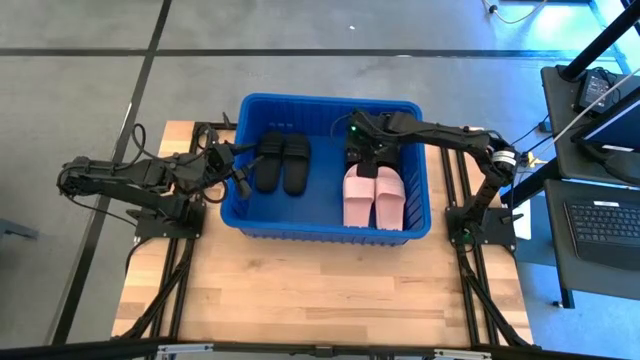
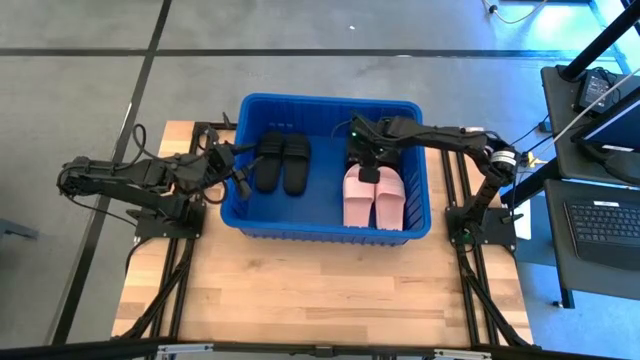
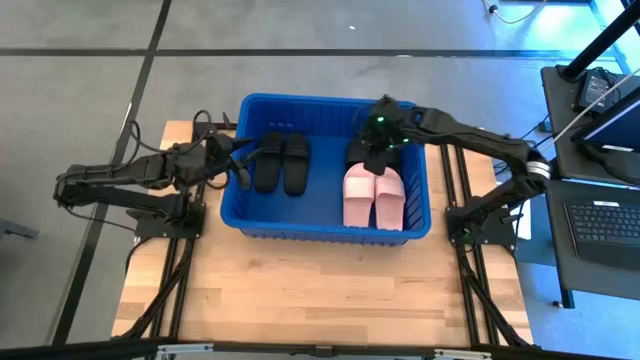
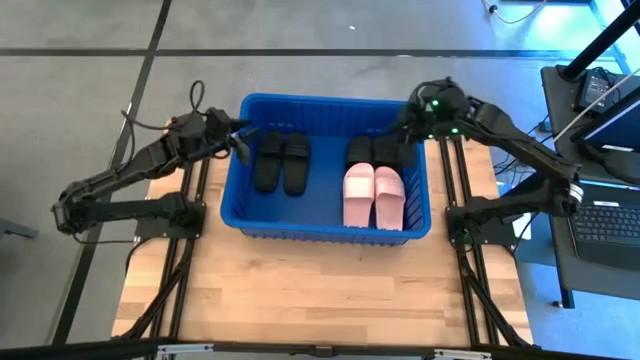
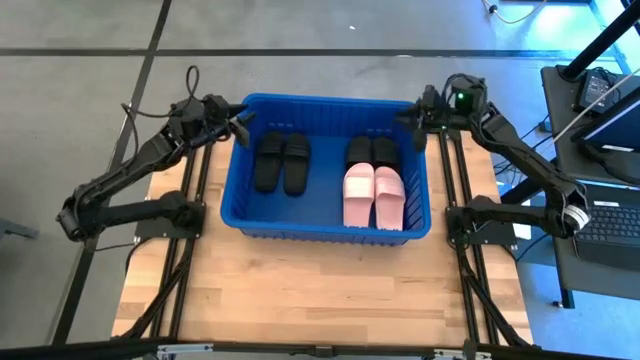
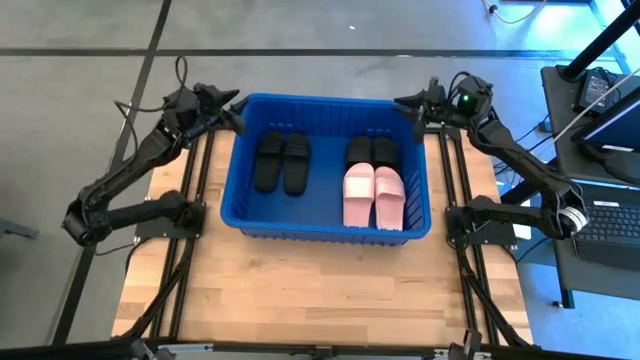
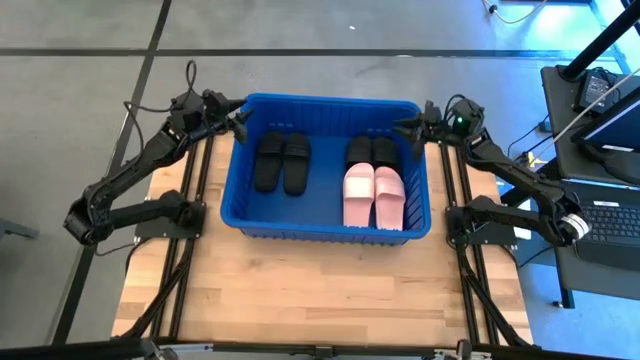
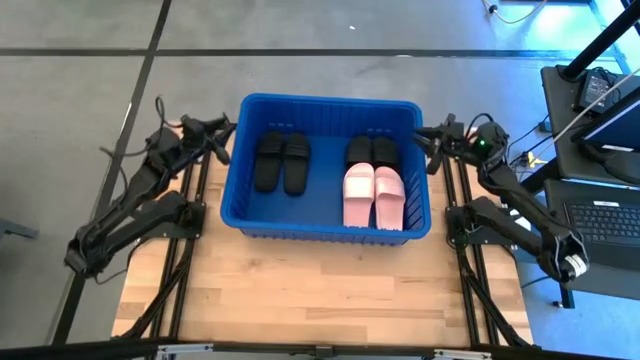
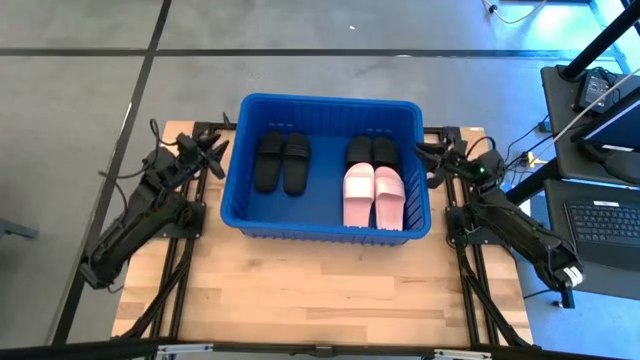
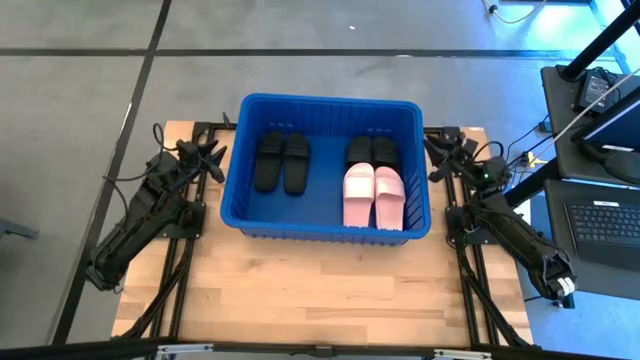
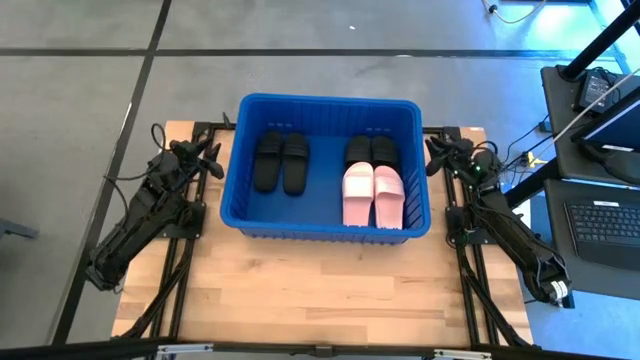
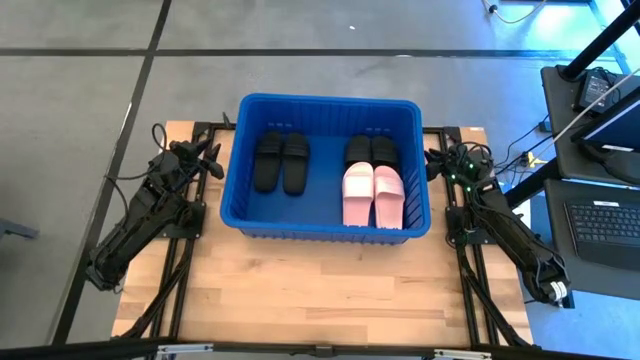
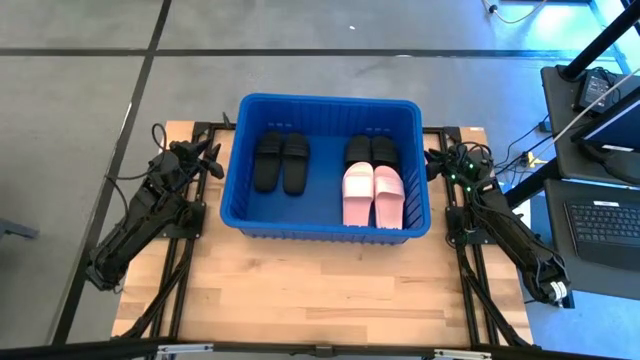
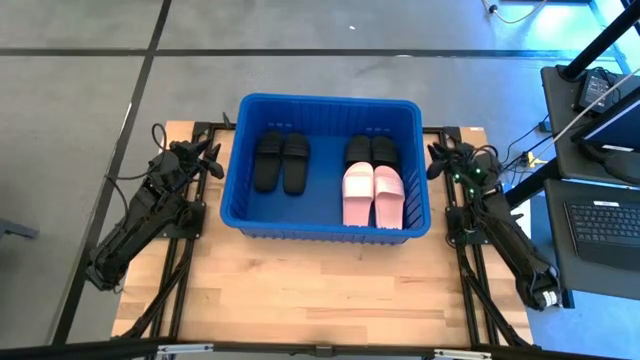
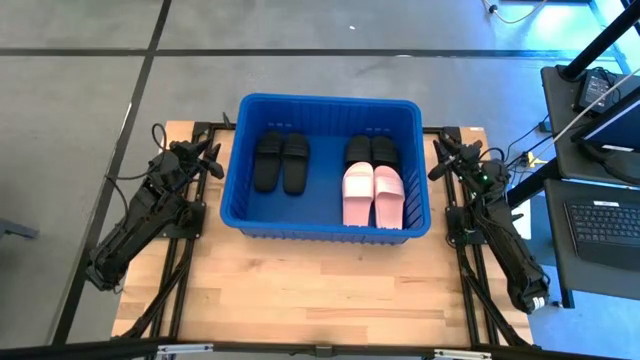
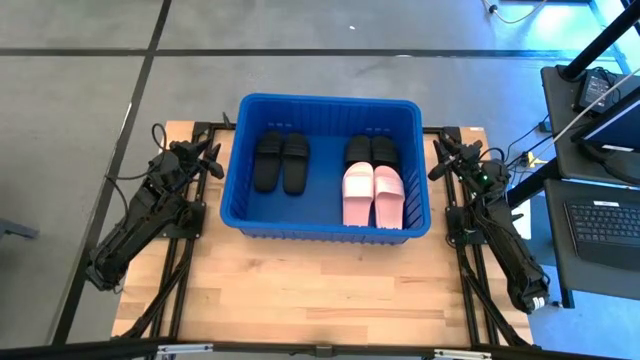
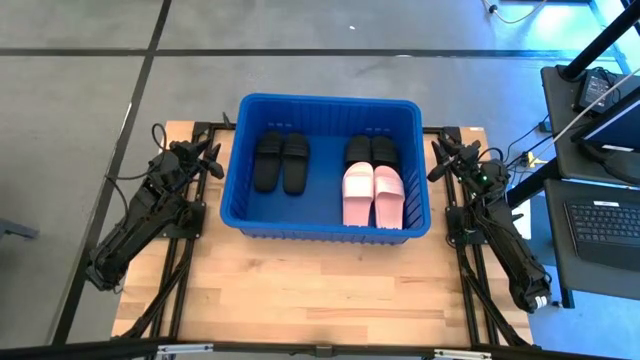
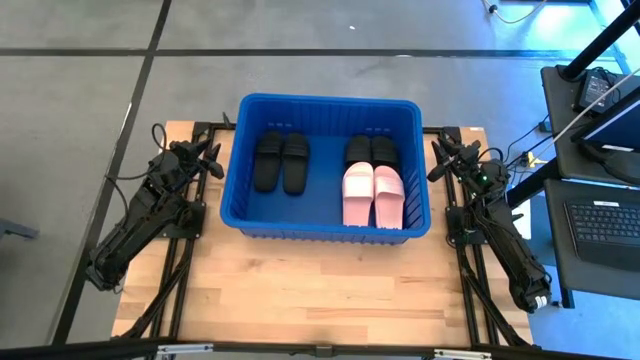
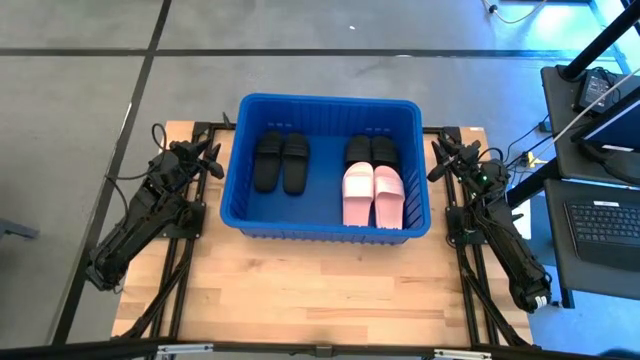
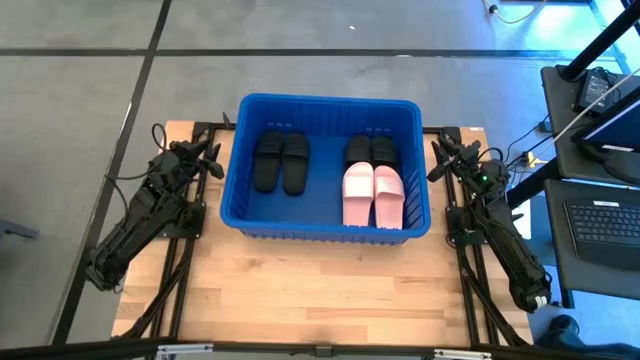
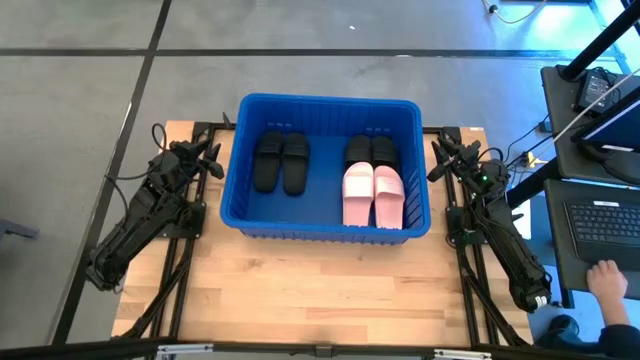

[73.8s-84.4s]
Task: Pick and place slides into bin
Return to Home Position

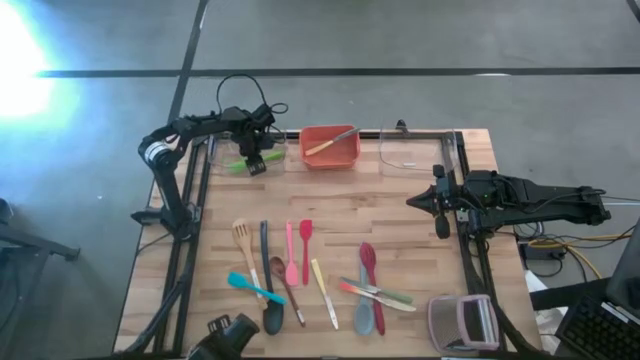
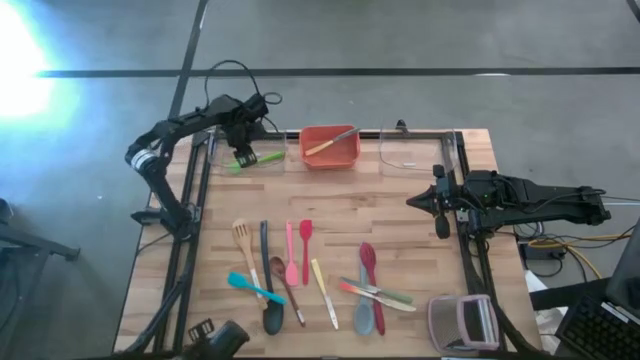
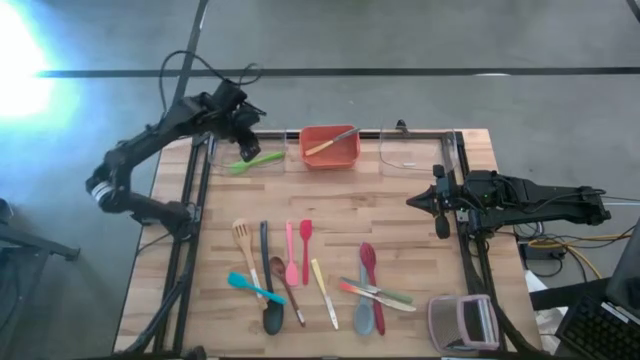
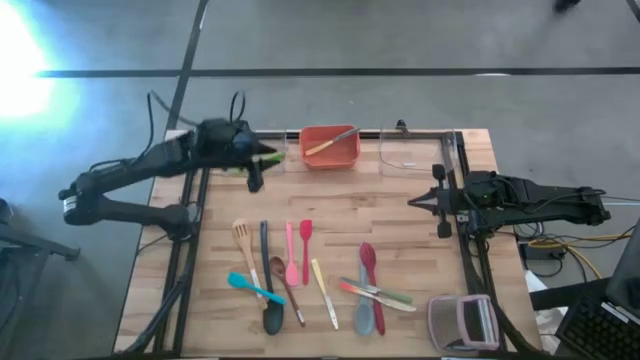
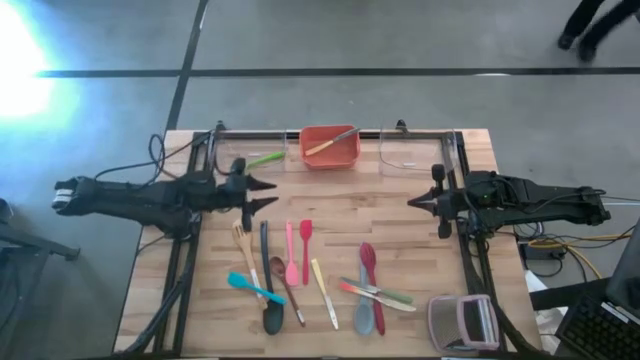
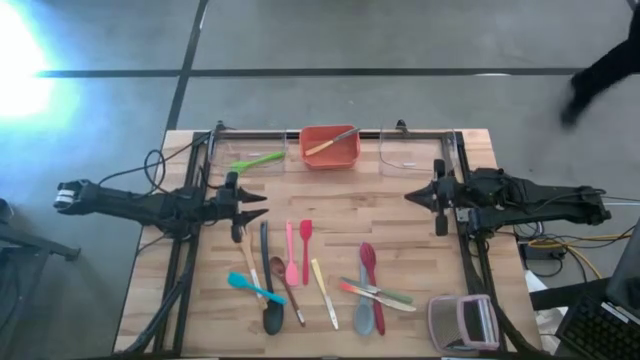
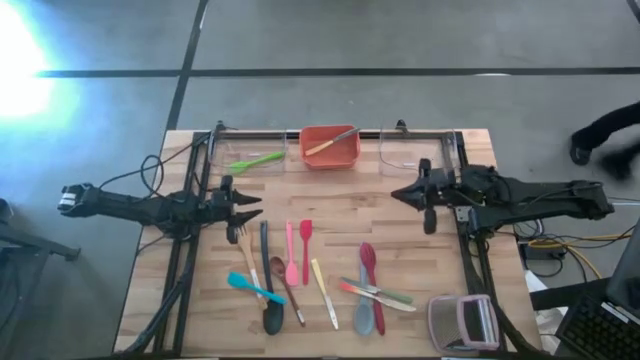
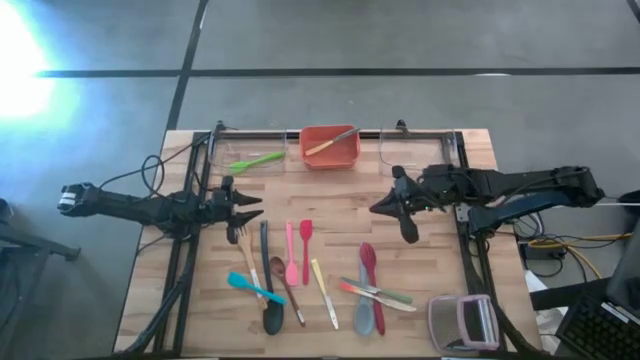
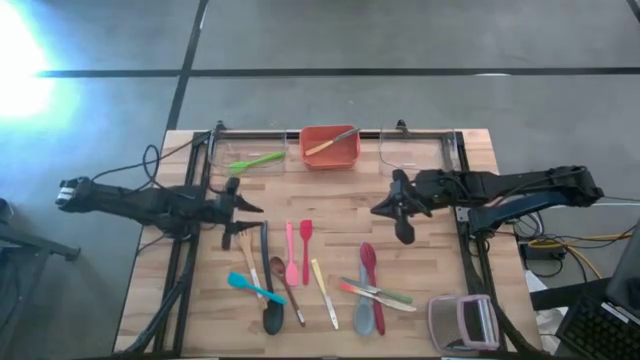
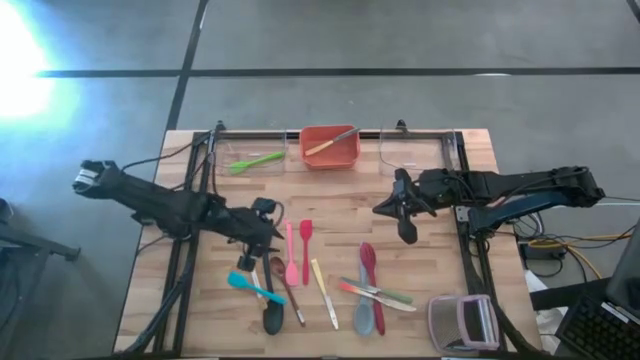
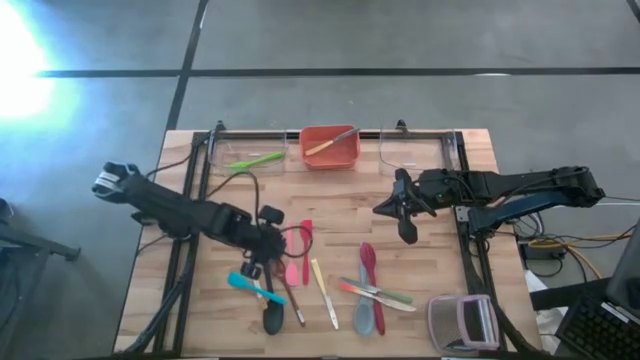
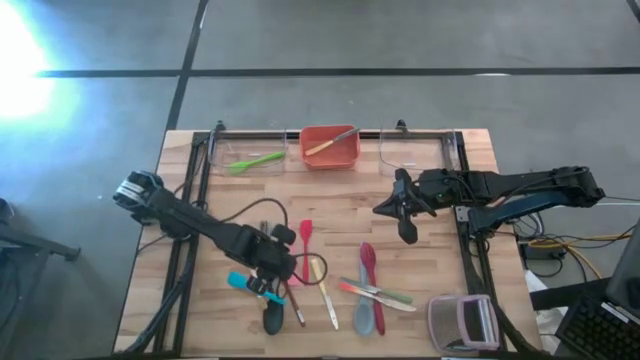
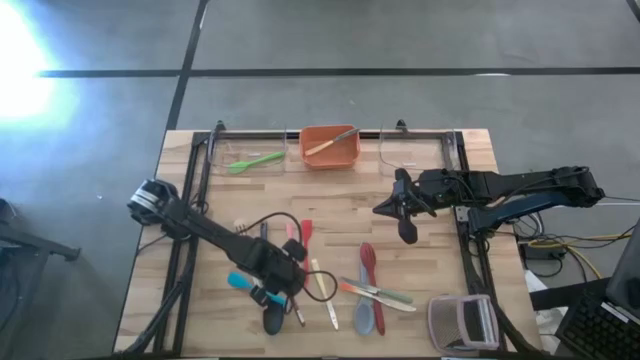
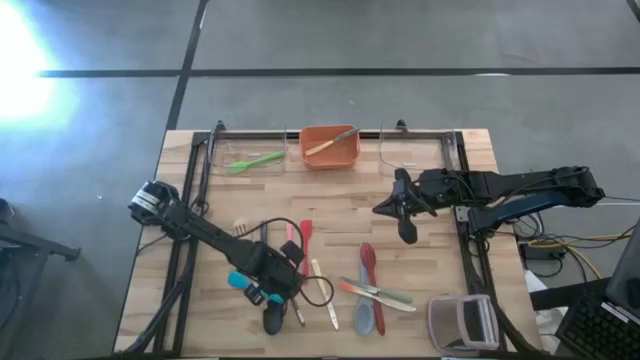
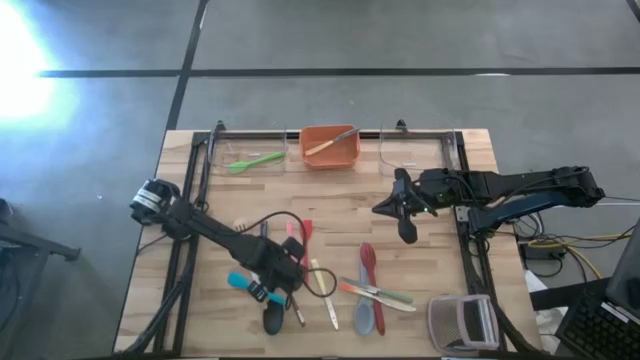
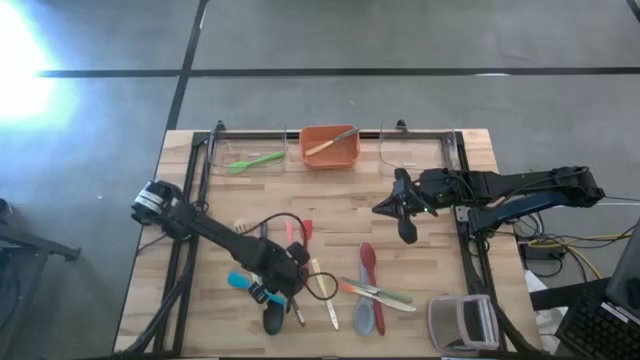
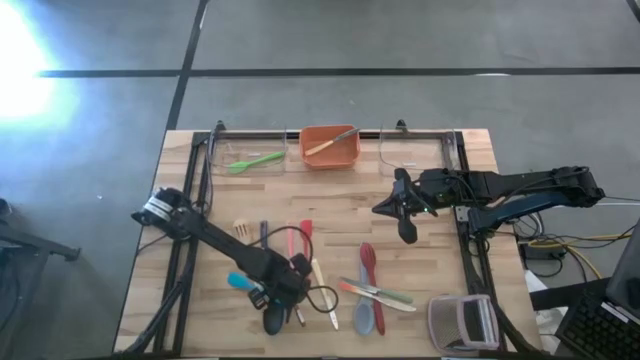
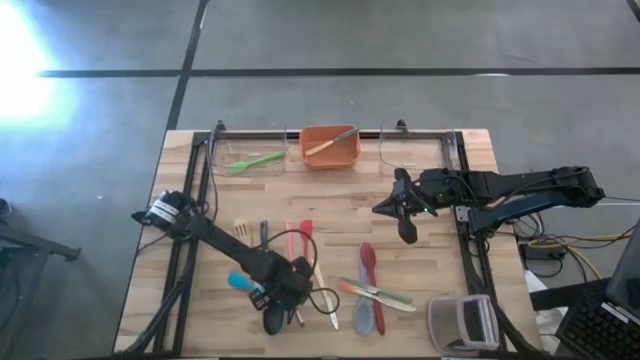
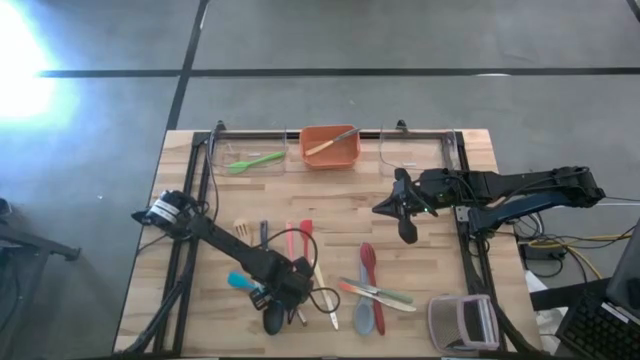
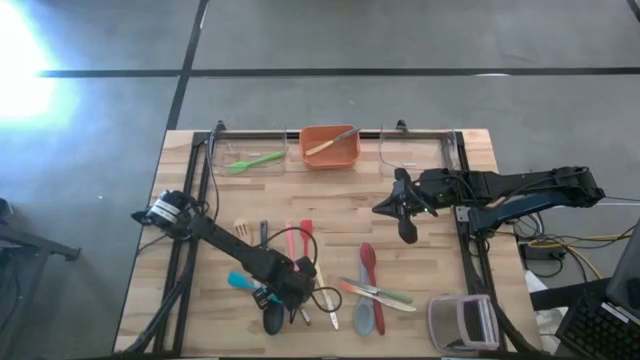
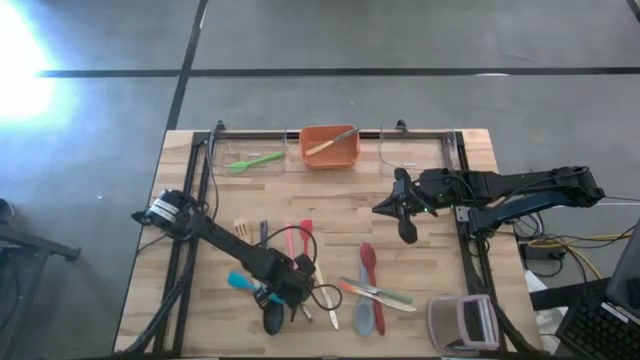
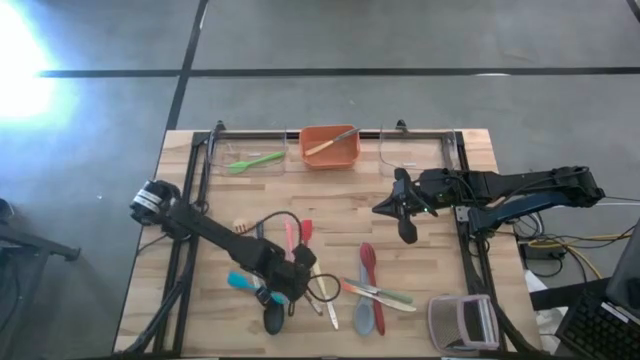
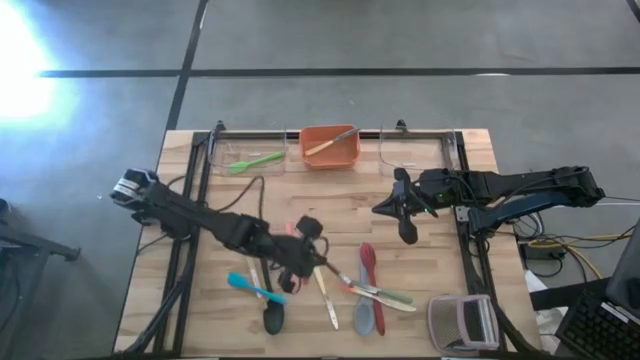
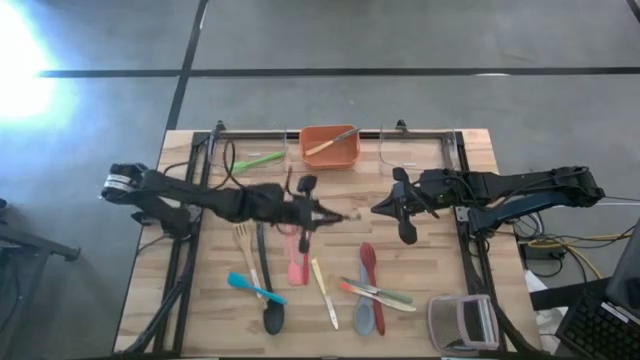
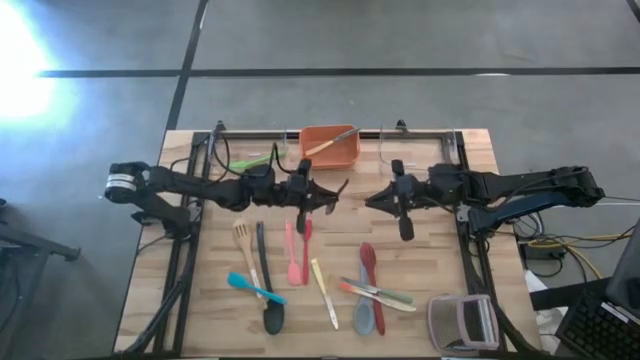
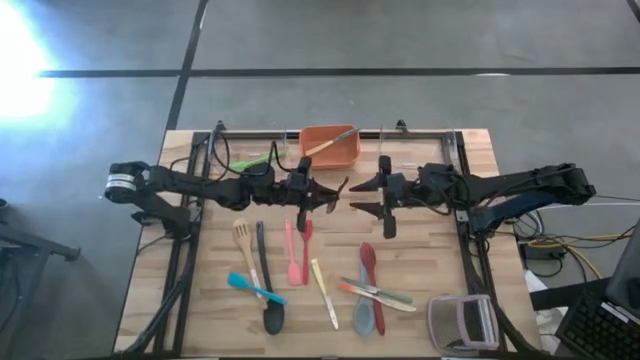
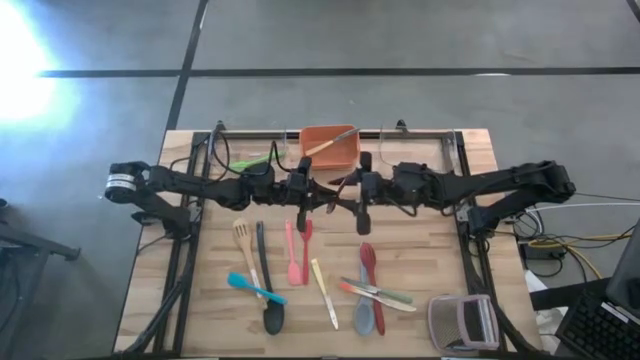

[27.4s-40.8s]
Task: Pick & Place Kitchen Items
Put the wooden serving spoon into the right transparent bin
